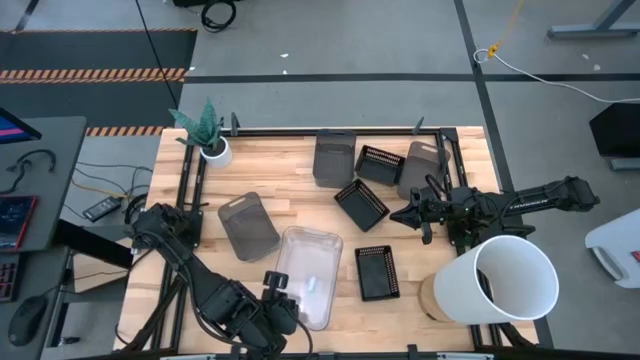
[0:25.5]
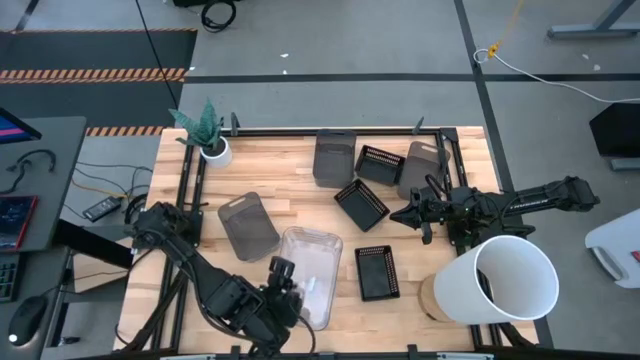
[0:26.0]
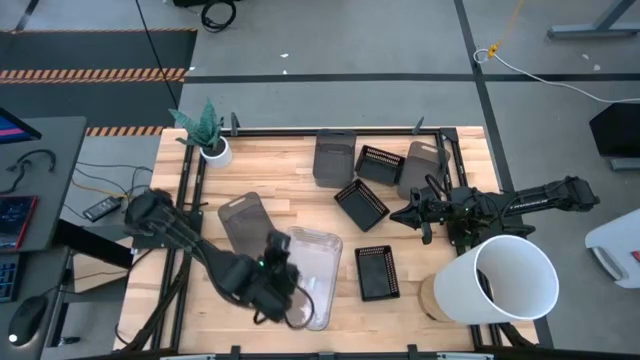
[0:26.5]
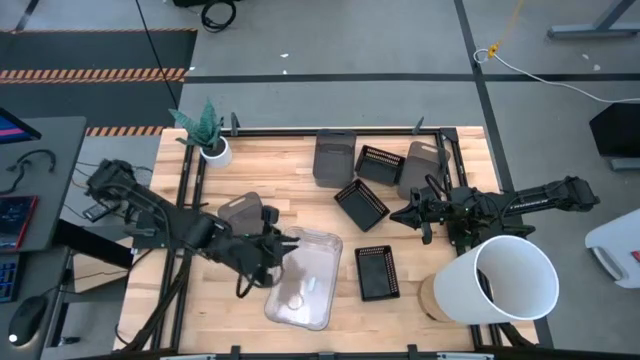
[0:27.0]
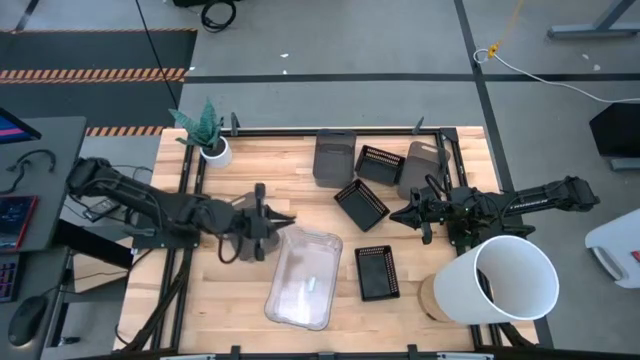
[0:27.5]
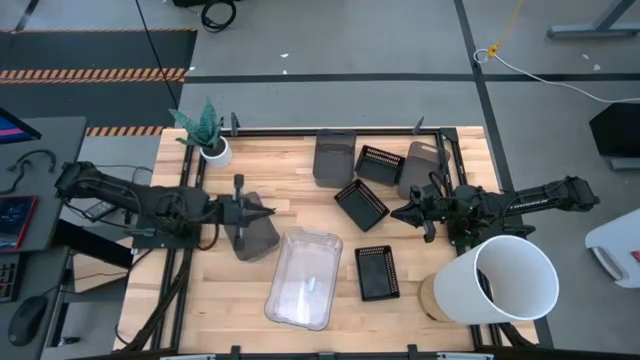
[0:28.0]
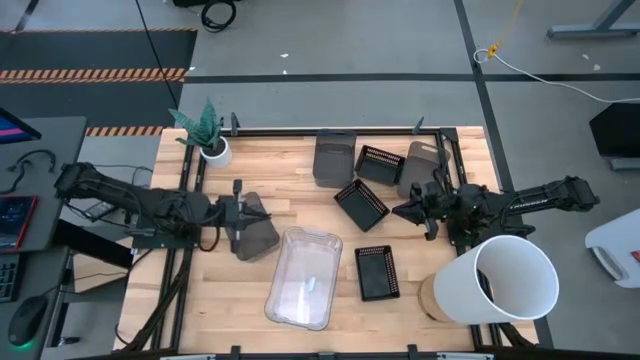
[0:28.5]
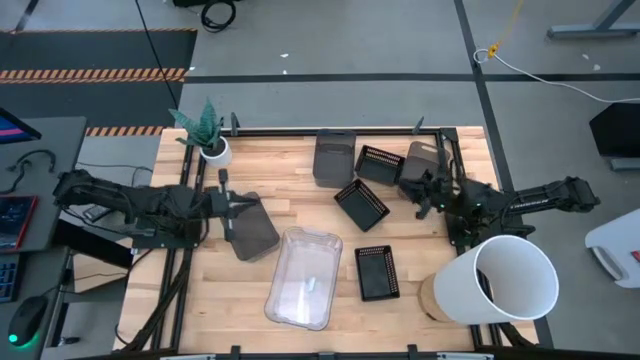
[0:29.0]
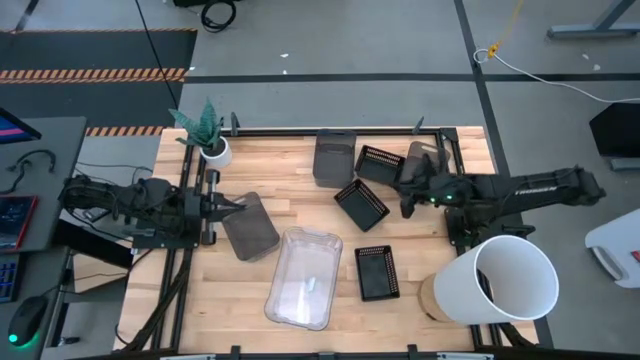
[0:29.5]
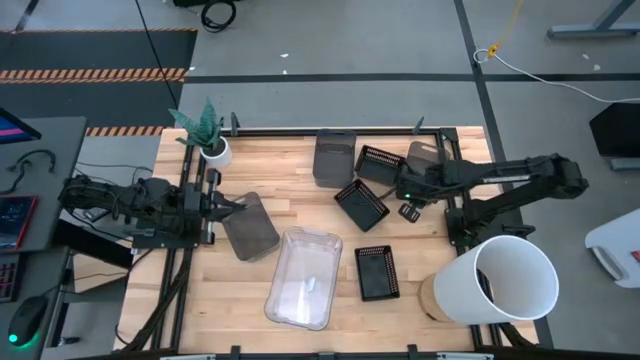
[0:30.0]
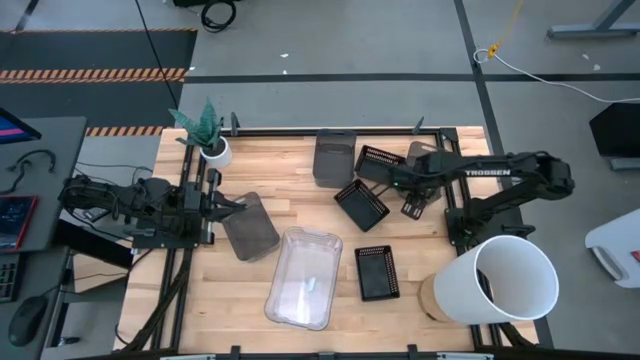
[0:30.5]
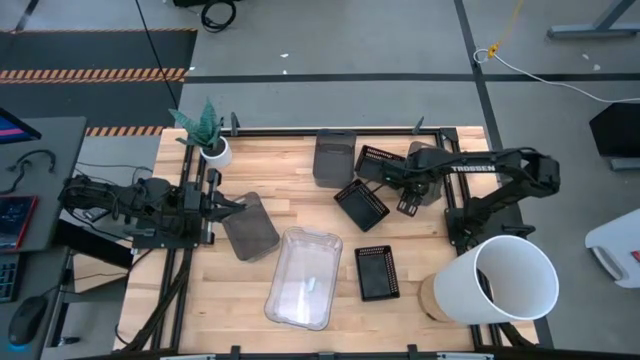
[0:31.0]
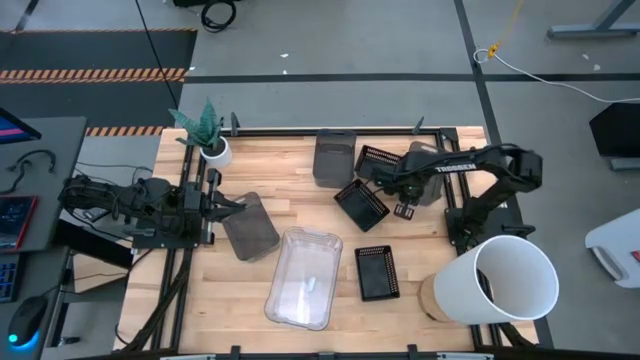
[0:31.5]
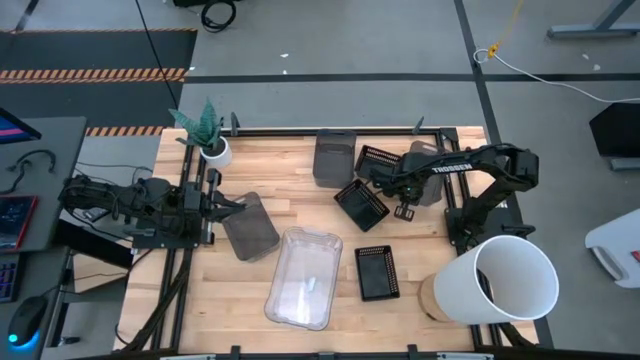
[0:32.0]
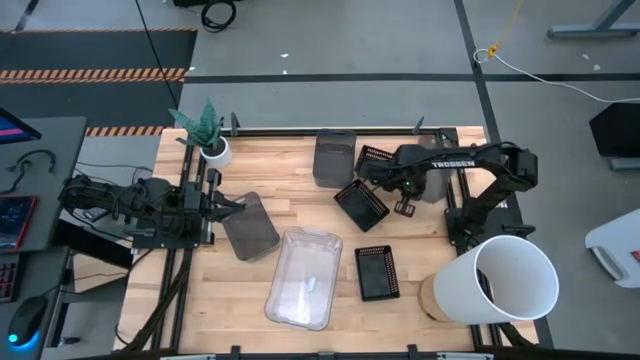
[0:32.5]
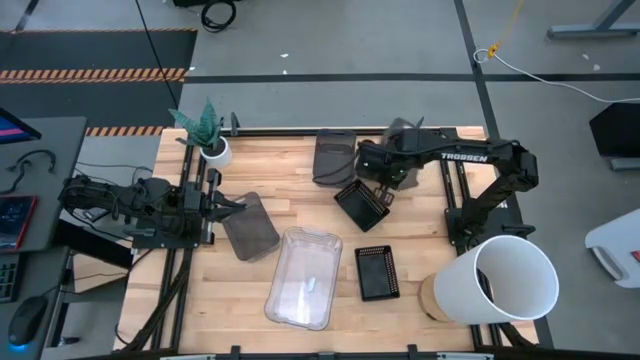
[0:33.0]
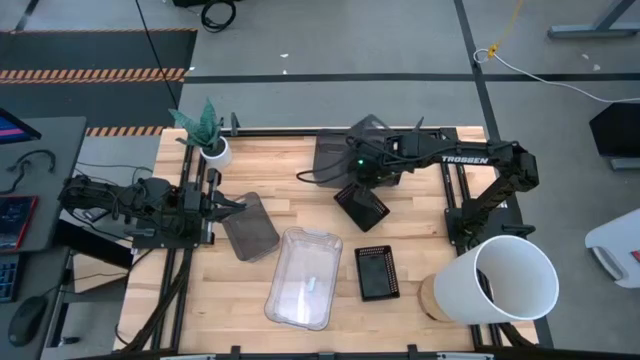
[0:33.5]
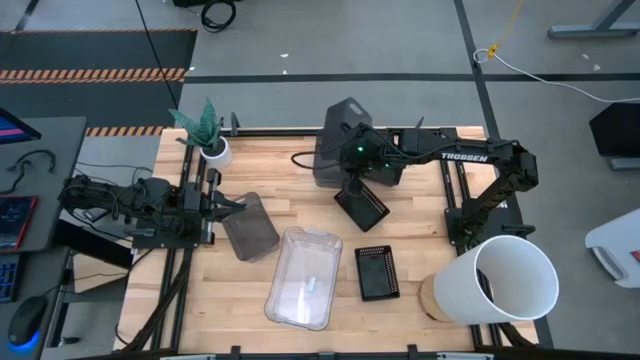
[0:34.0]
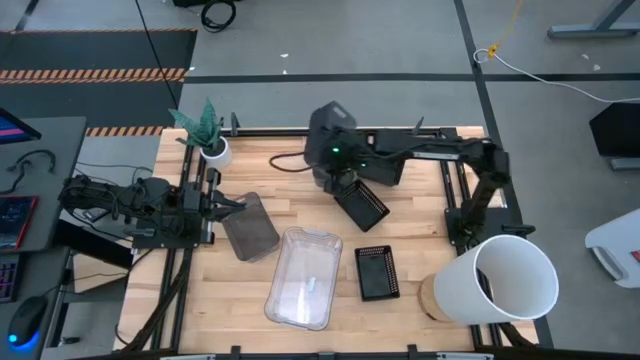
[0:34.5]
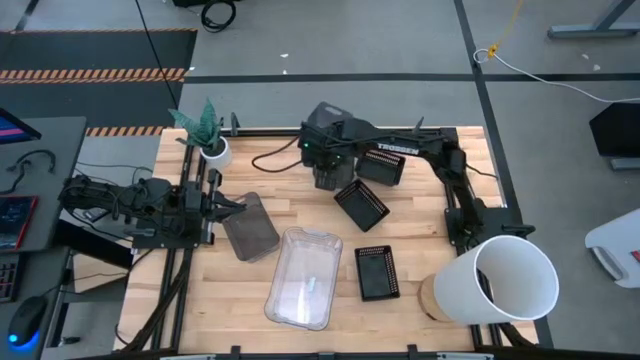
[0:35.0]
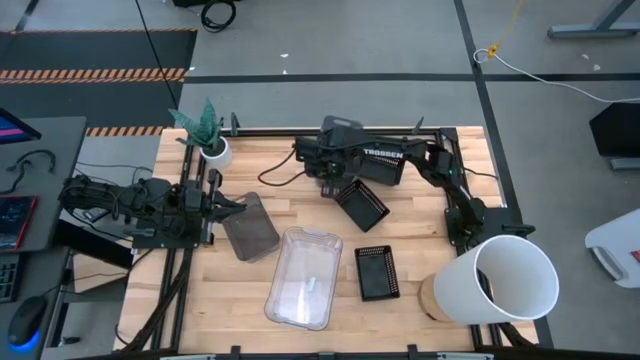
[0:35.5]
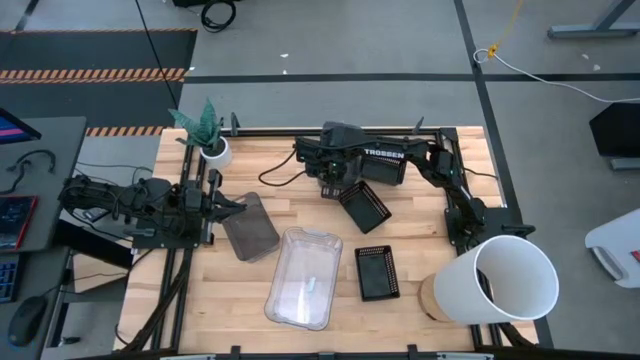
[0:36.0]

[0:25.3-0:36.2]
Stack the right gray bin on top of the middle gray bin

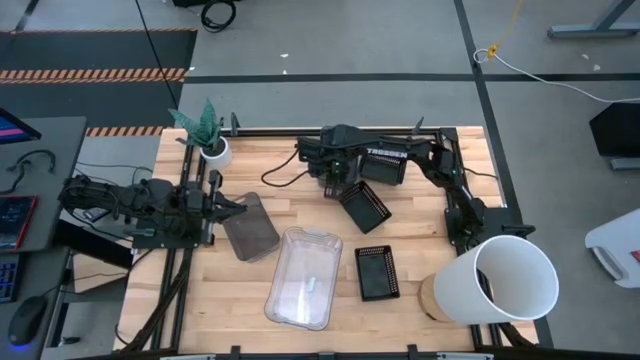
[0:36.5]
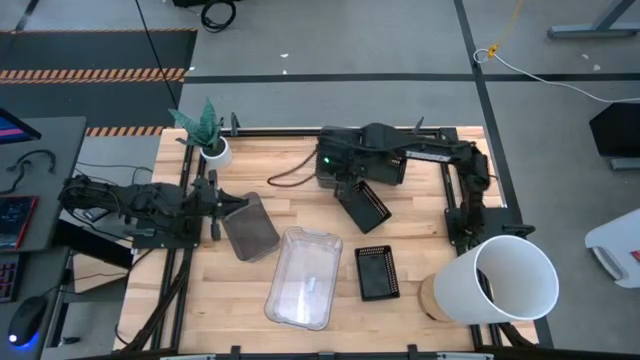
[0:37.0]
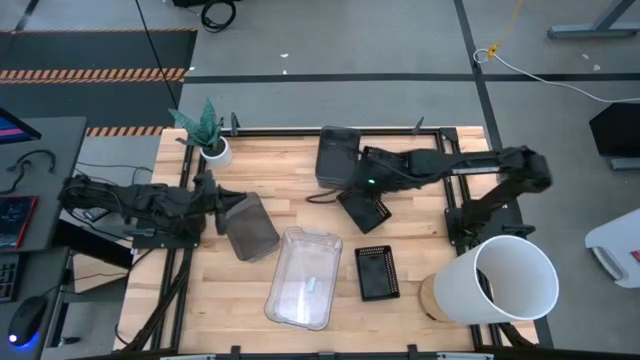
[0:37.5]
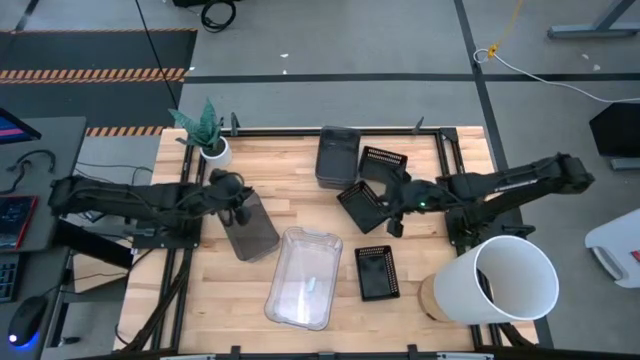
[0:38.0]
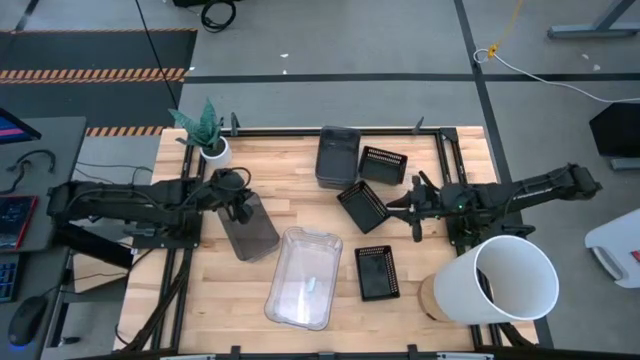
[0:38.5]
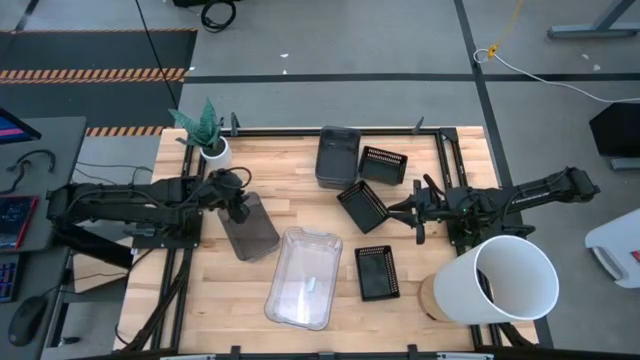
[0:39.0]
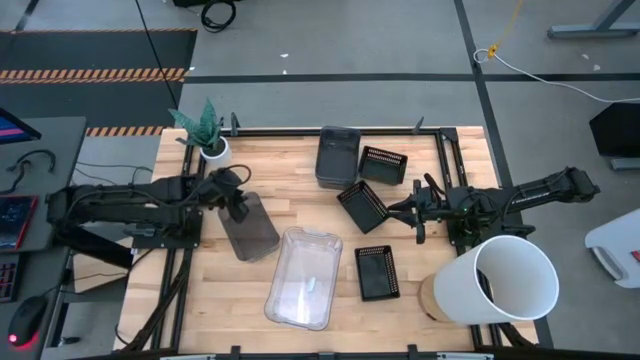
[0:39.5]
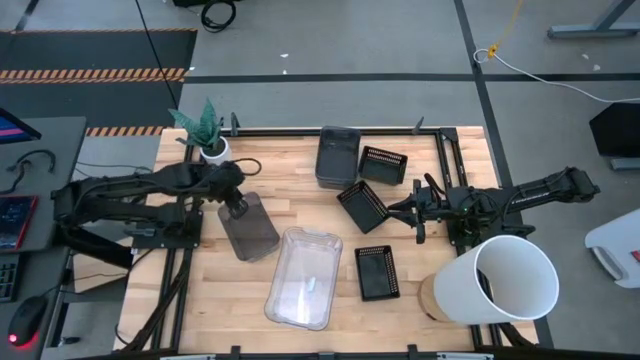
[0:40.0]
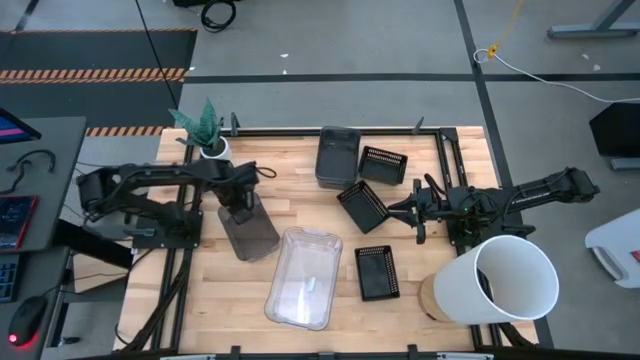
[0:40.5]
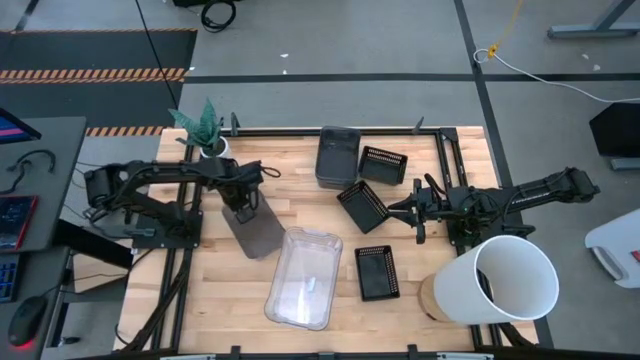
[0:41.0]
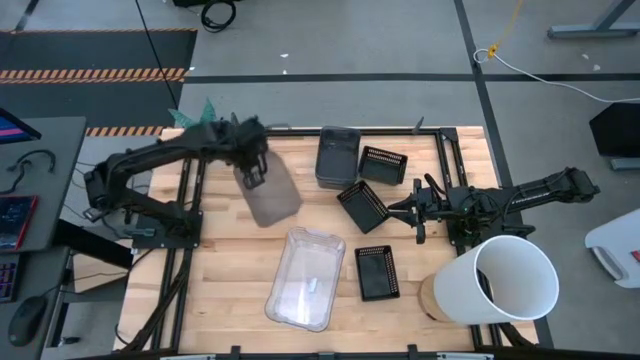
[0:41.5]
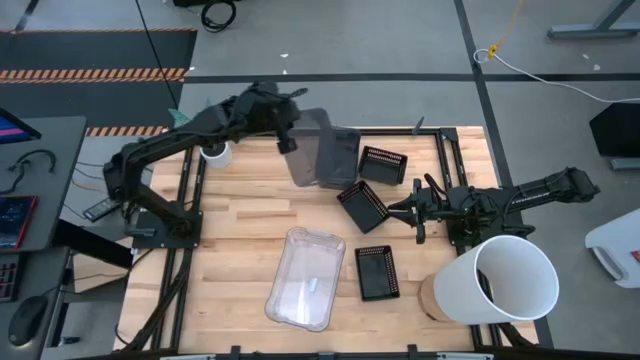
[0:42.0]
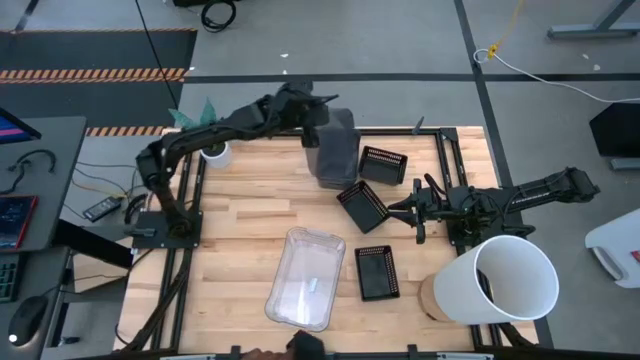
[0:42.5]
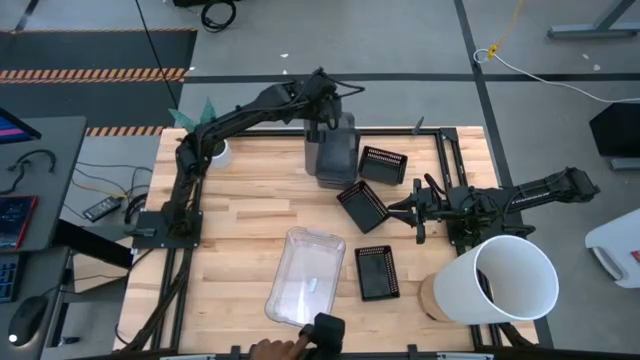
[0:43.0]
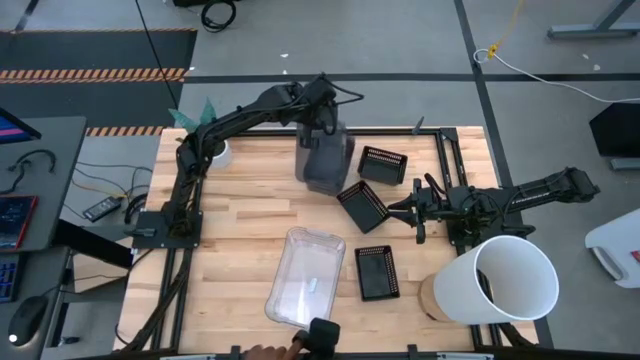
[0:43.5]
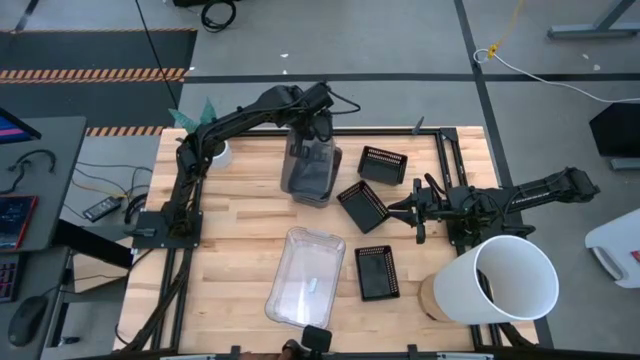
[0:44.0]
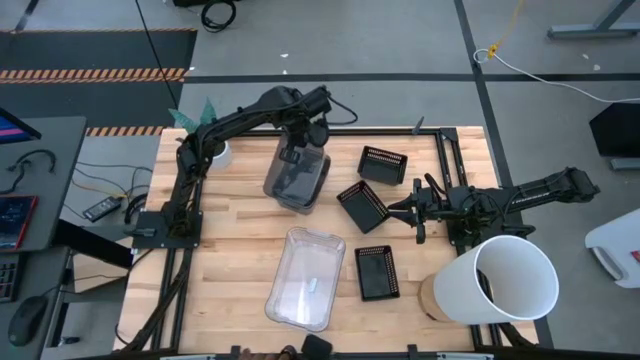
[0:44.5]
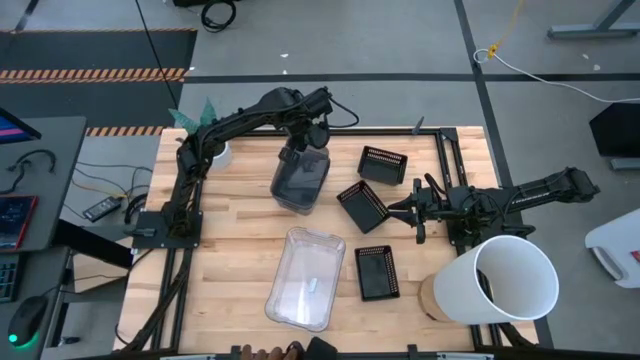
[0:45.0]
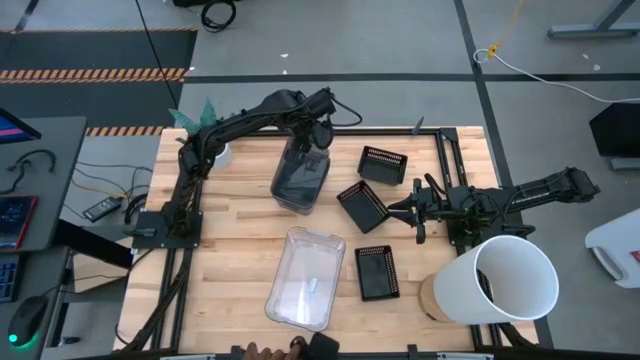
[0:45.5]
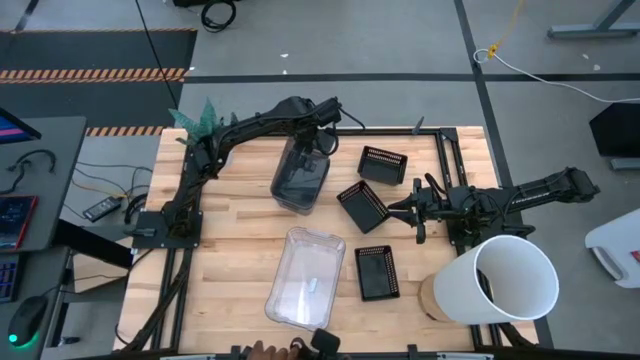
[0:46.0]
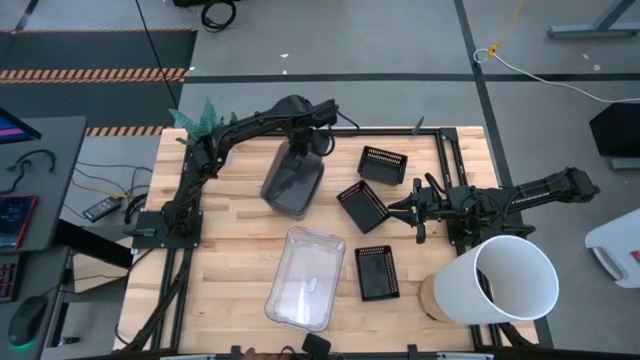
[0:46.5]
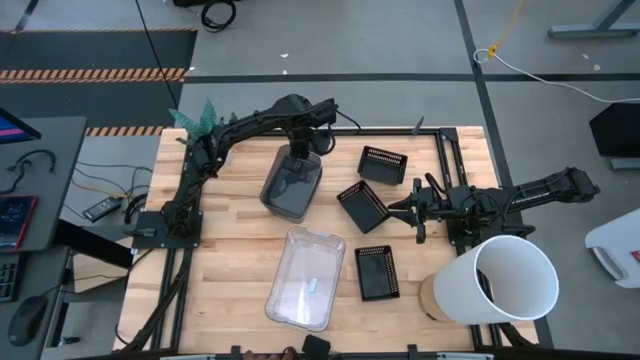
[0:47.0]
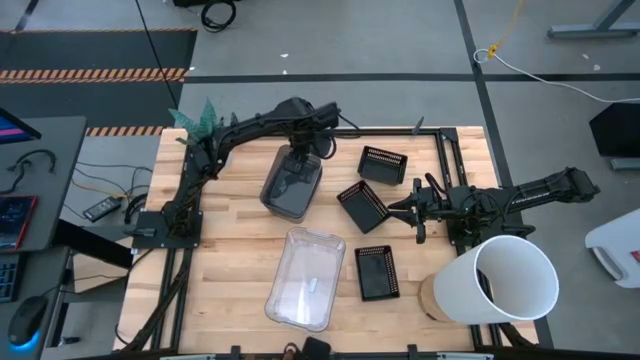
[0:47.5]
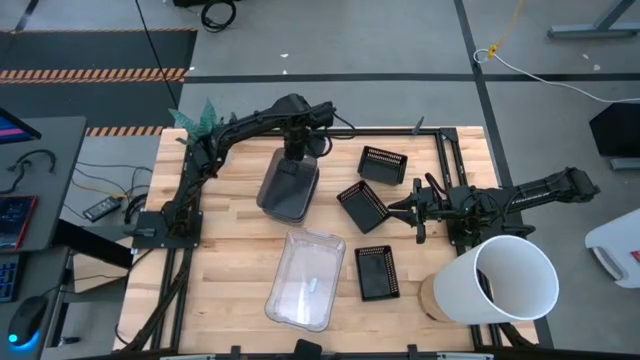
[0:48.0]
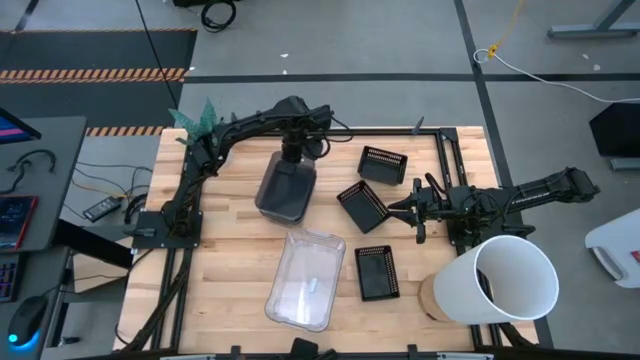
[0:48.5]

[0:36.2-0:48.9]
Stack the left gray bin on top of the right gray bins
